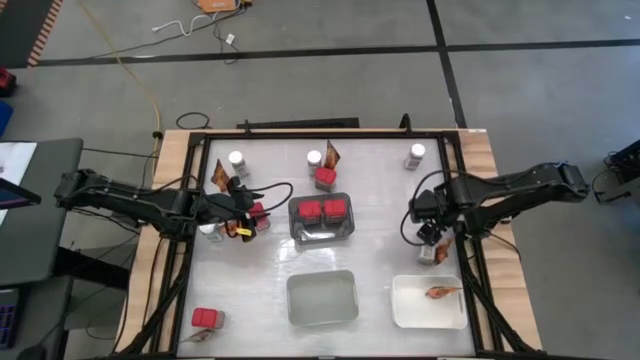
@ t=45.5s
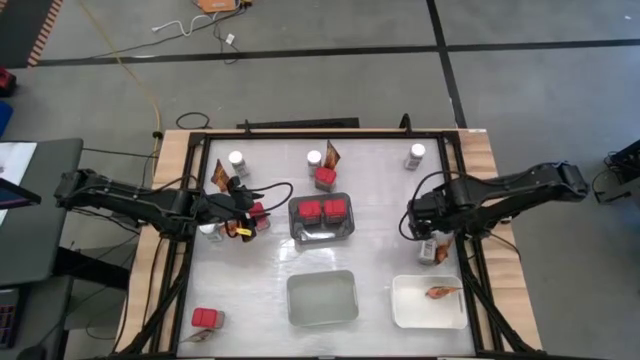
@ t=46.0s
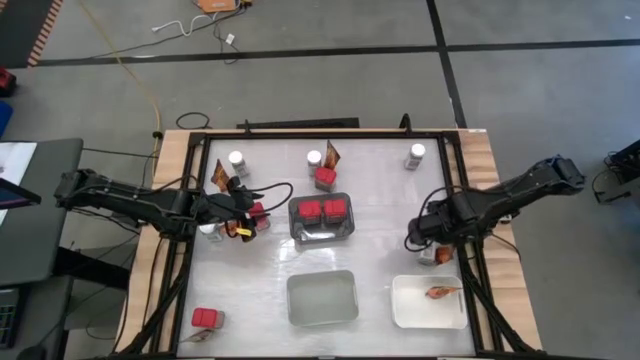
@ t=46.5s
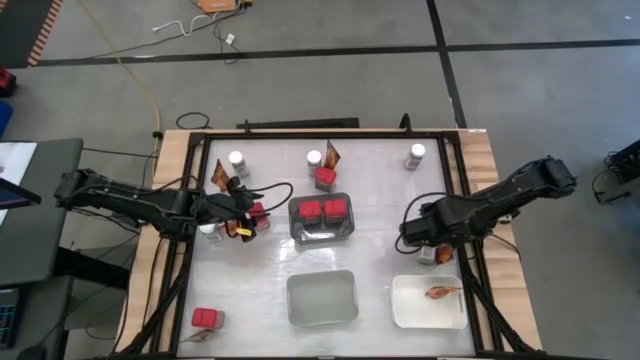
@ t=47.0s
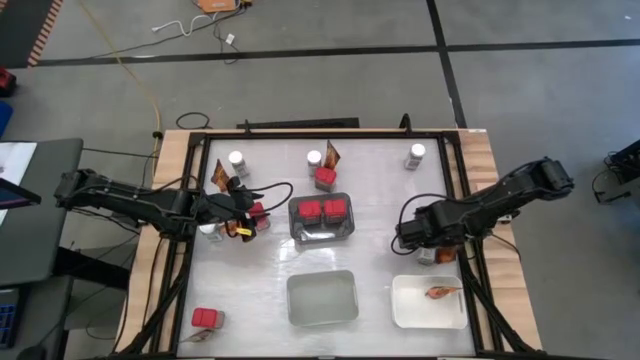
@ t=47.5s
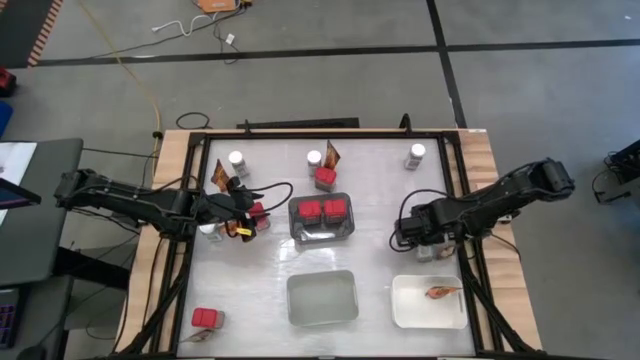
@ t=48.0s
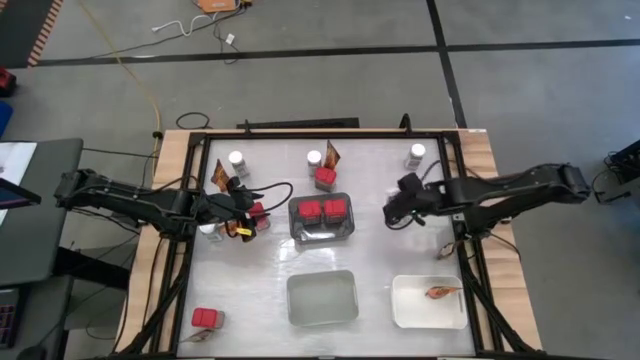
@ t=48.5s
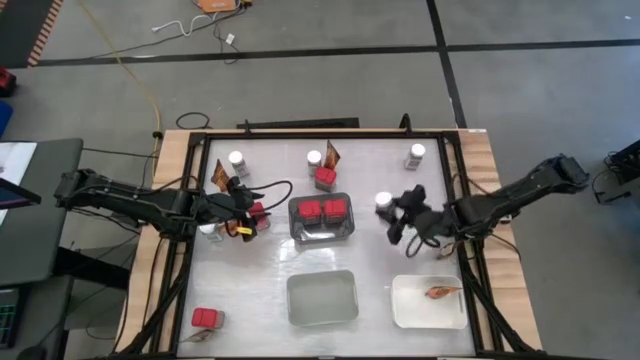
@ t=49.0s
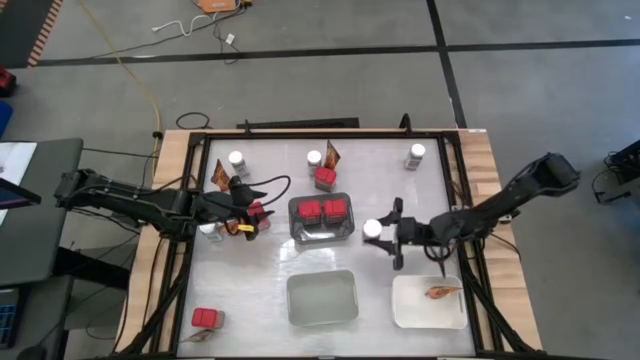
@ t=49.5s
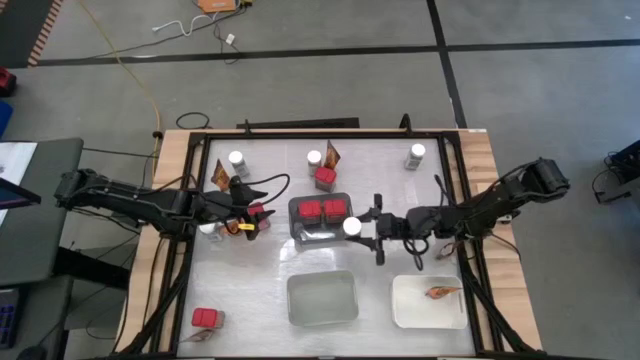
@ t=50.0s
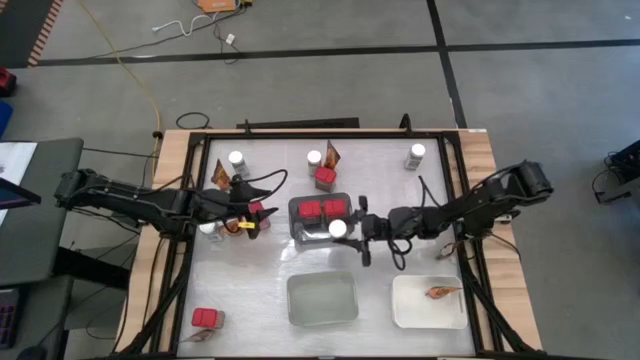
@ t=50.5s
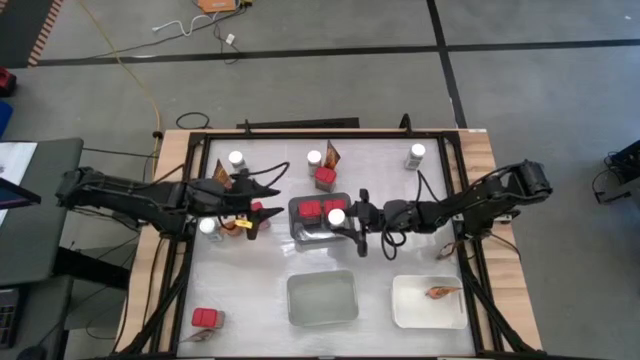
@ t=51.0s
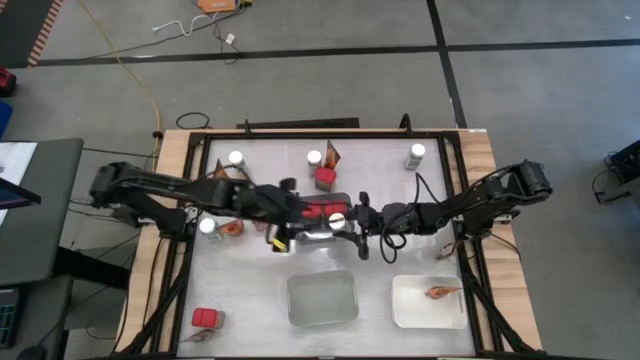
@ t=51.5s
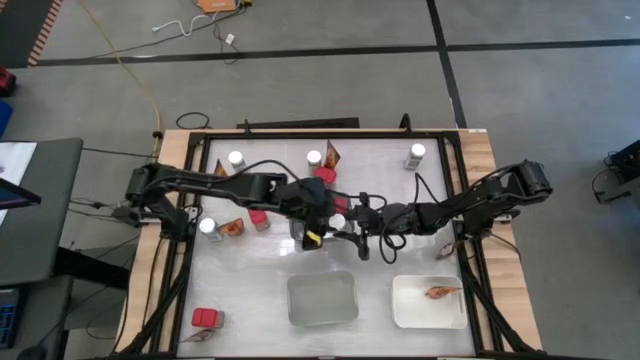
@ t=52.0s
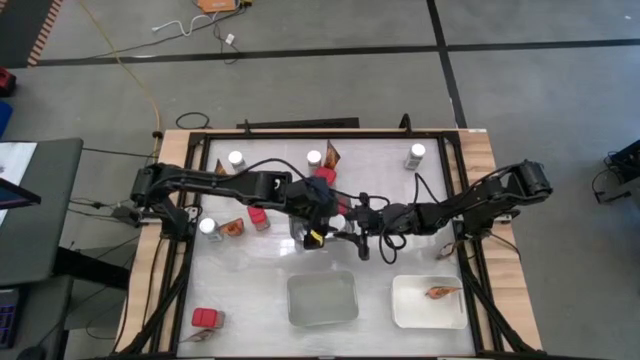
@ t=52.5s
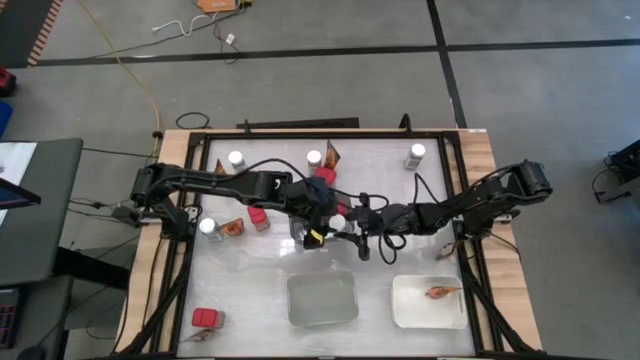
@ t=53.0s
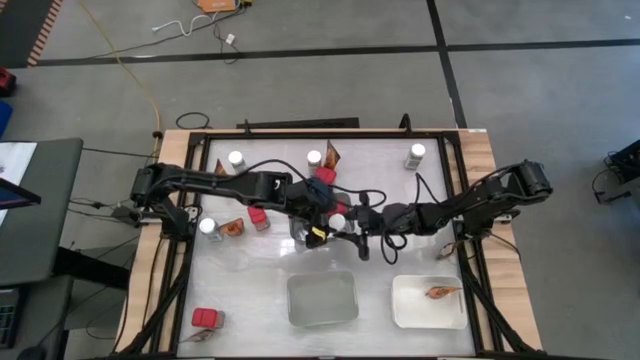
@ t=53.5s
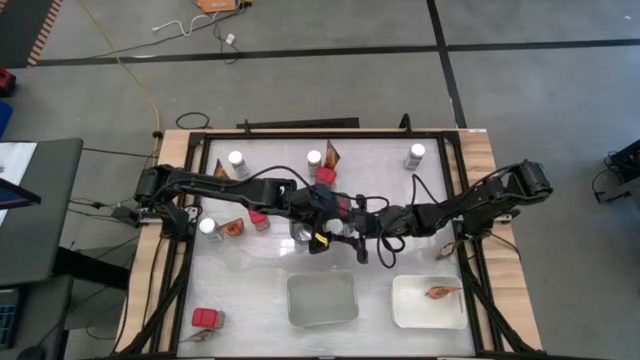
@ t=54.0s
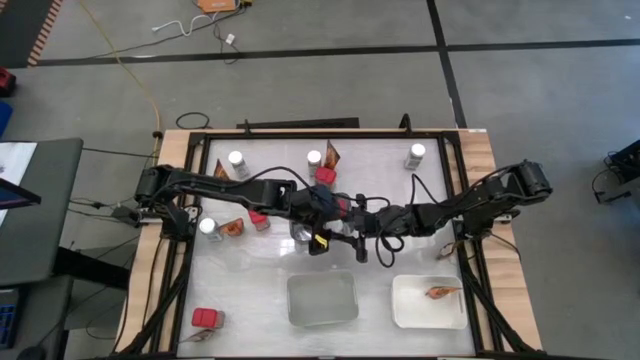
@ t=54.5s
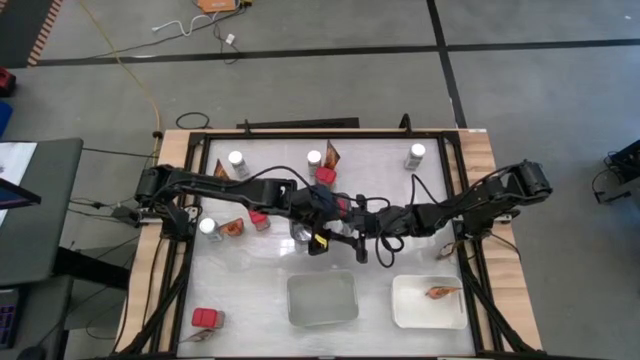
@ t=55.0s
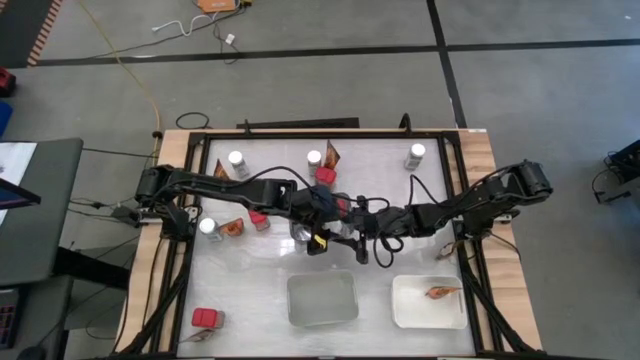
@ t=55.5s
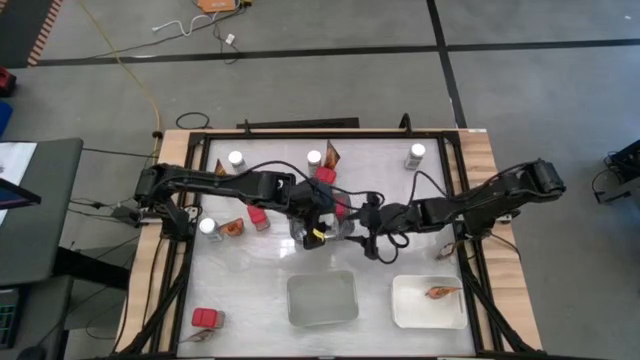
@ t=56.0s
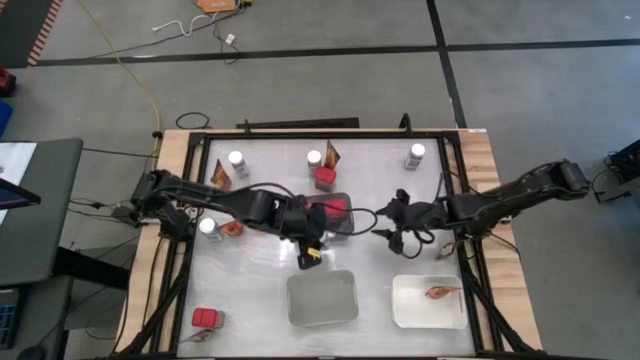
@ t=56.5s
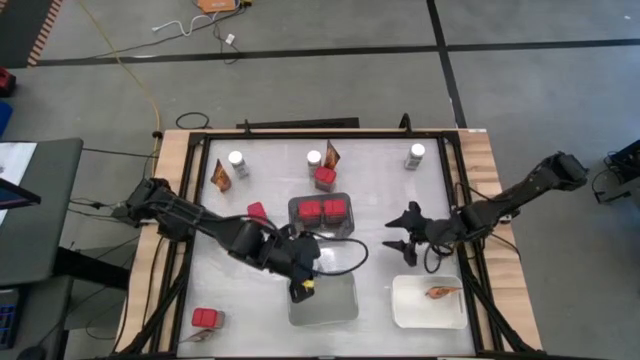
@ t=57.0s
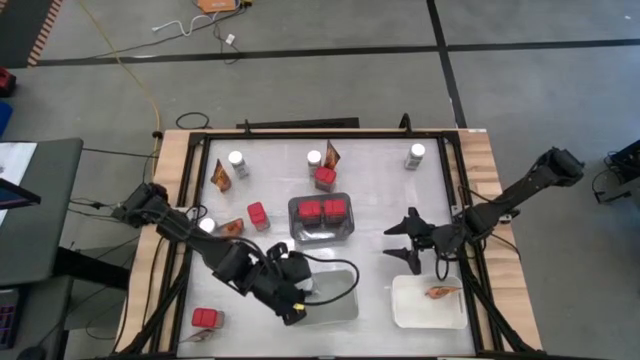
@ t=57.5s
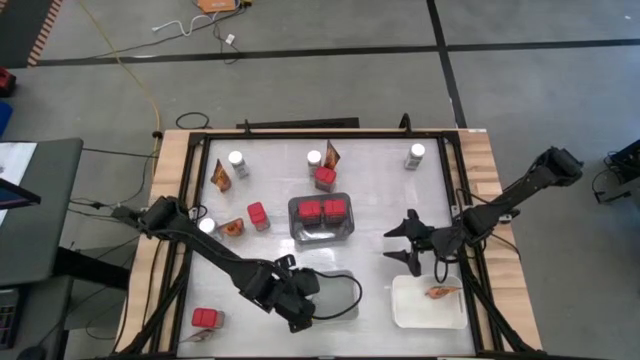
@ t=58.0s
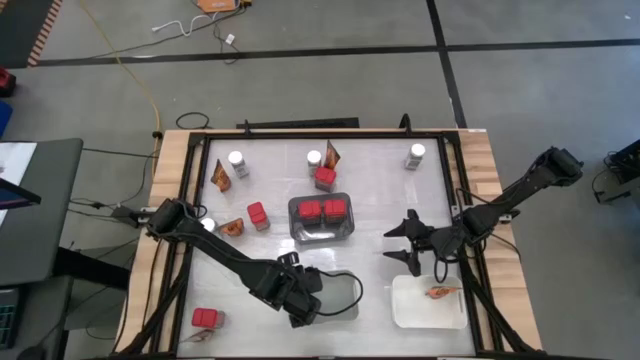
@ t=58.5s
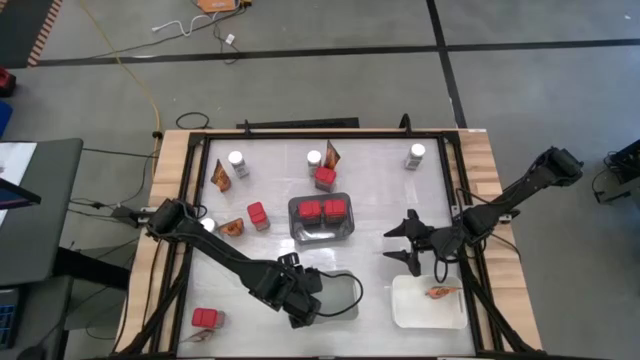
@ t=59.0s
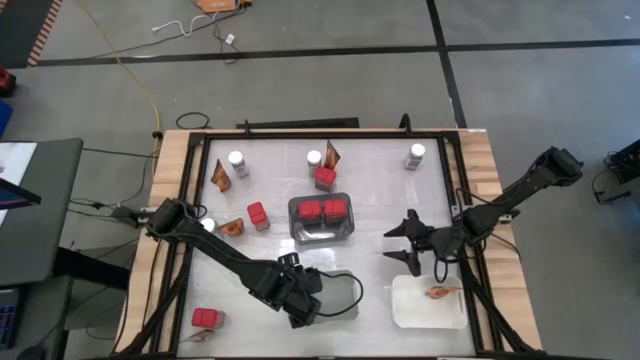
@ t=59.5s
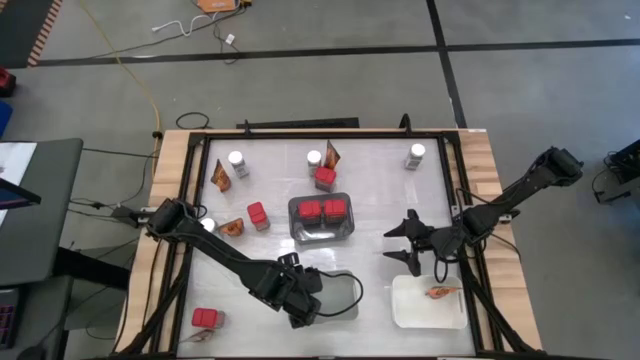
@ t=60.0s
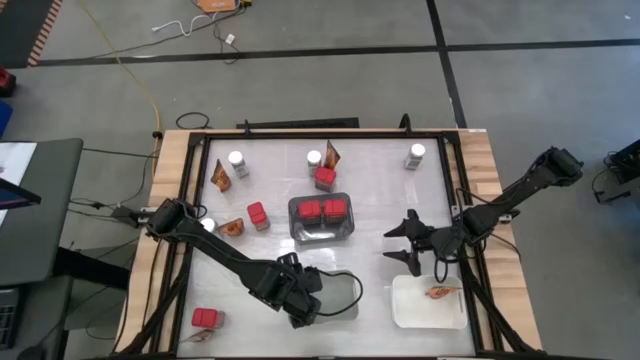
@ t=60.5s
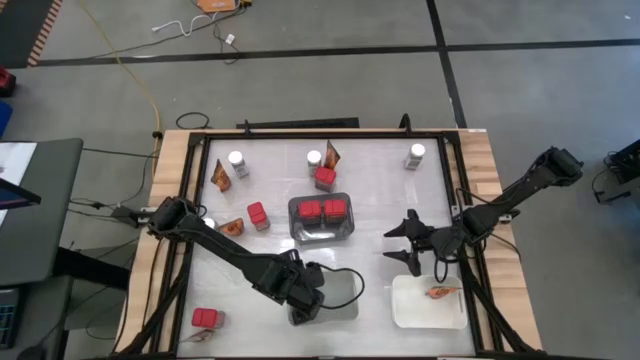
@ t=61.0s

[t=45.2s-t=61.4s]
Task: Sort spices by type
Put the white seasoning bottle into the gray bin

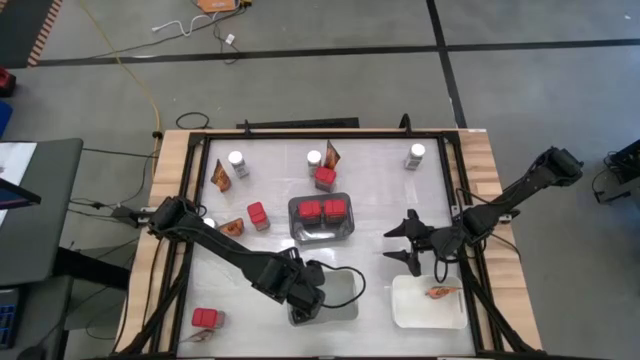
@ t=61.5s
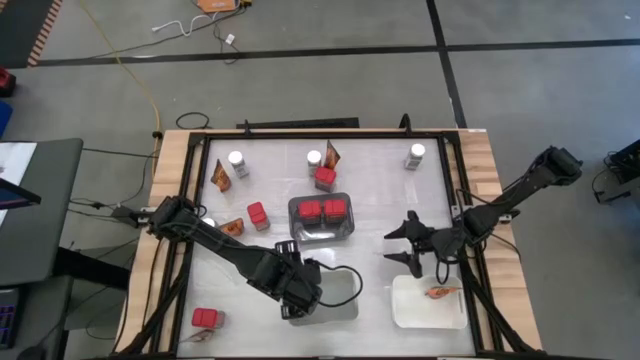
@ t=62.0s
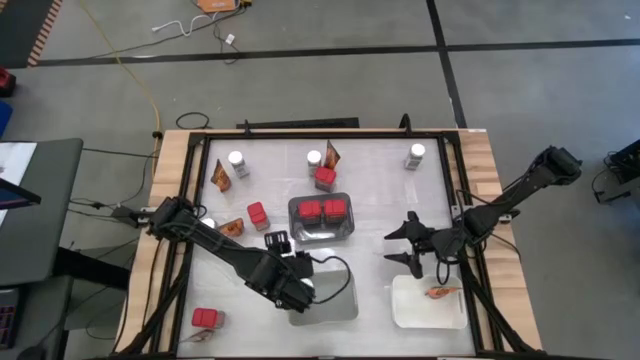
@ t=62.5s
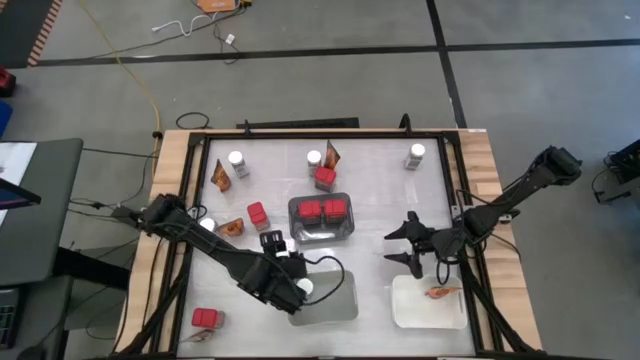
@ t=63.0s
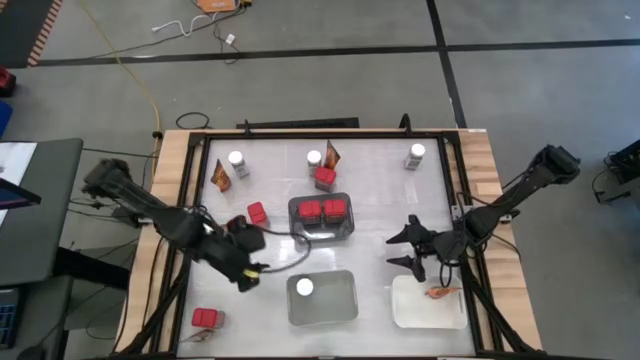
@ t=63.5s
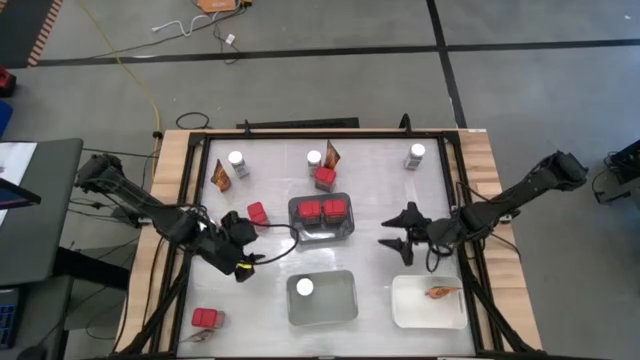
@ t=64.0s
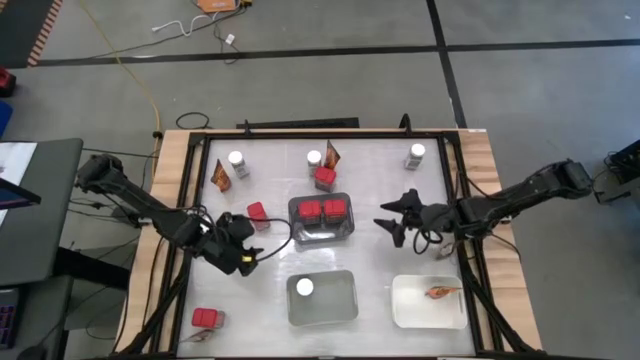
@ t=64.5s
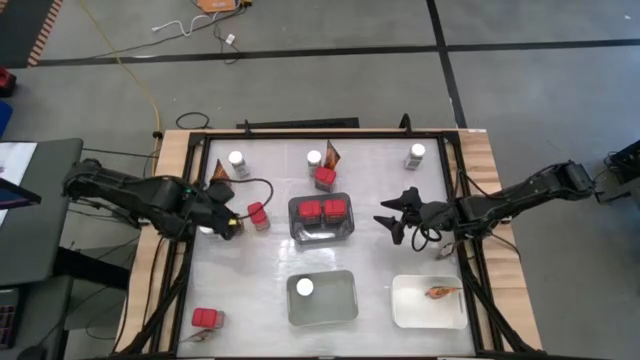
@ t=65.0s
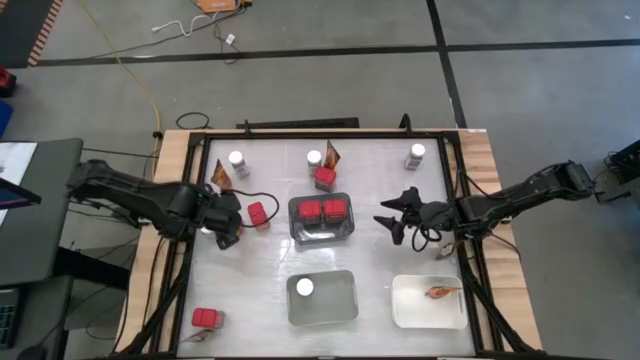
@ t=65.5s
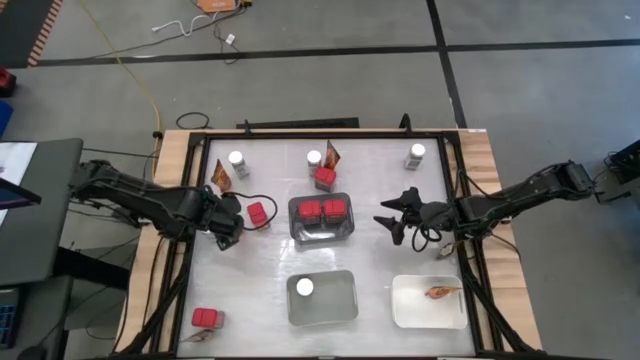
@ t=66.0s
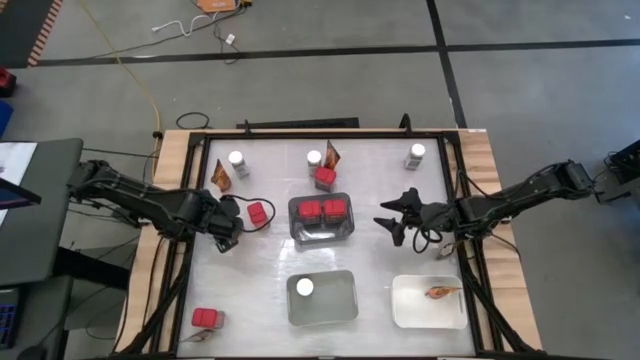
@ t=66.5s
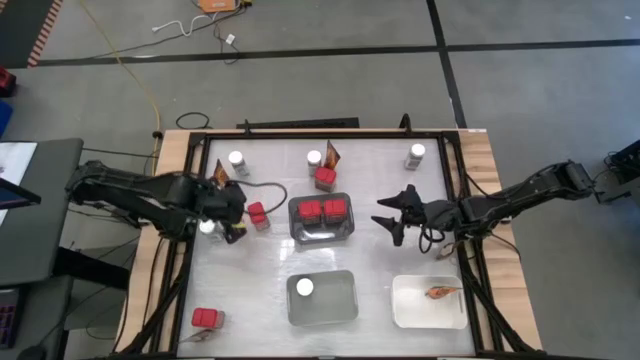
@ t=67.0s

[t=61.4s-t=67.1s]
Put the orange seasoning pack into the white bin
